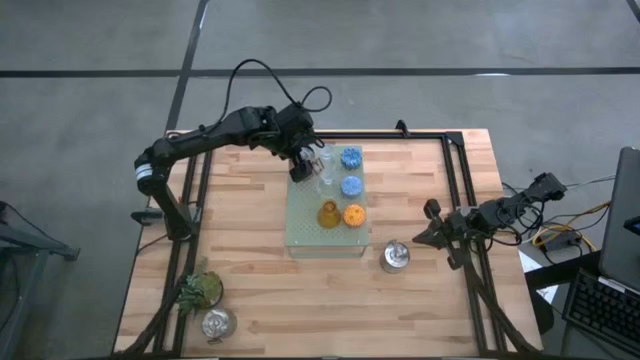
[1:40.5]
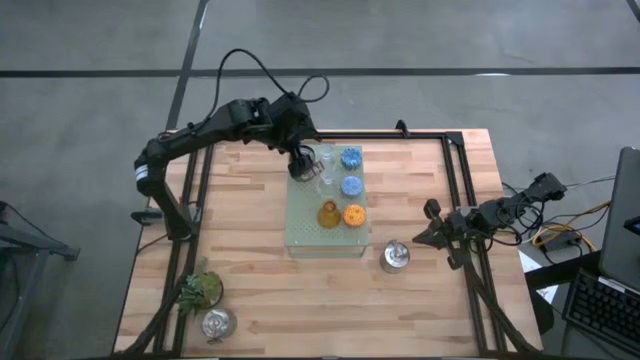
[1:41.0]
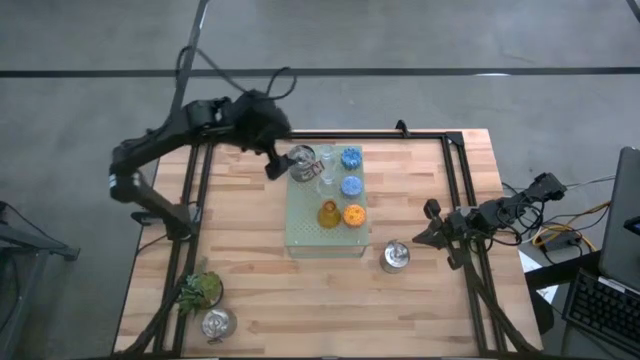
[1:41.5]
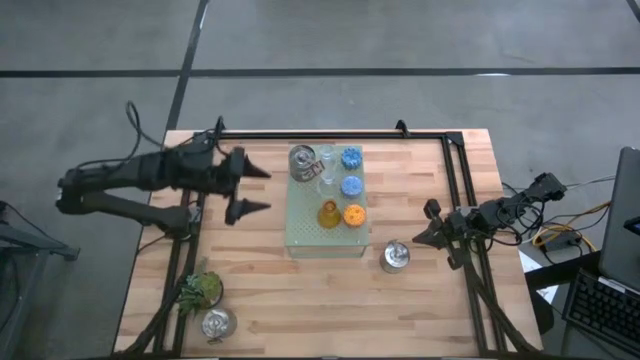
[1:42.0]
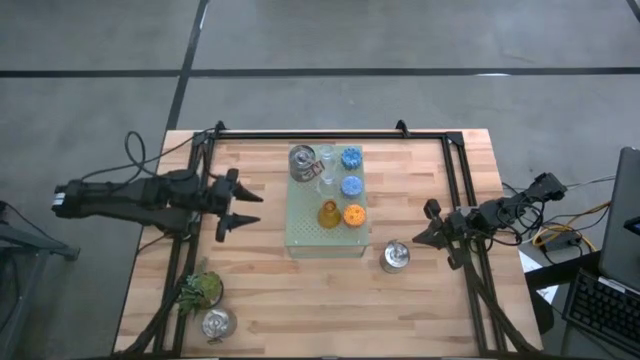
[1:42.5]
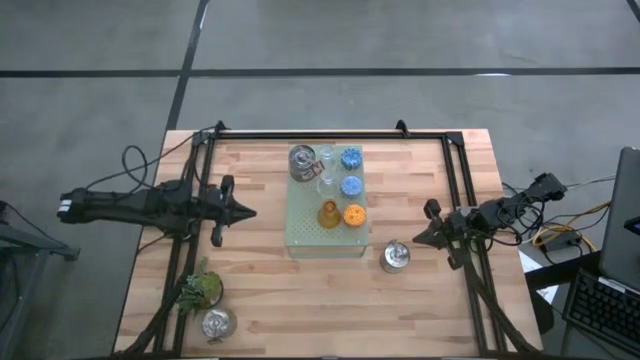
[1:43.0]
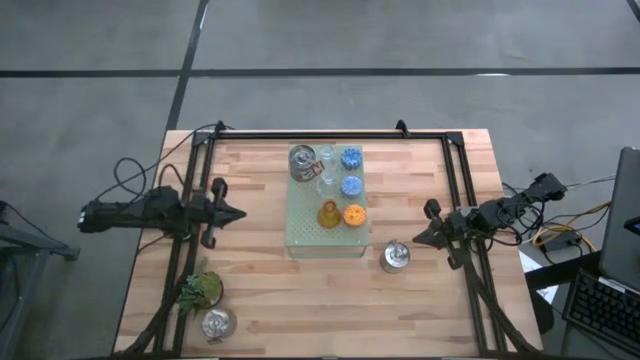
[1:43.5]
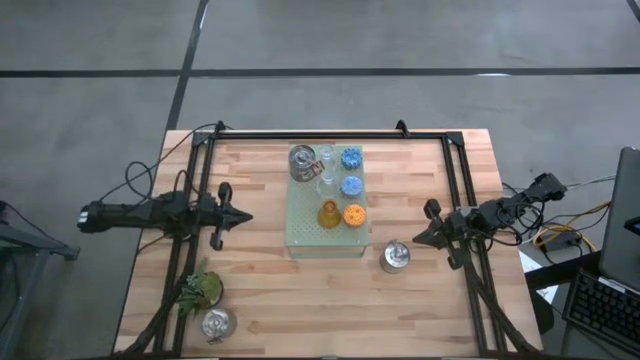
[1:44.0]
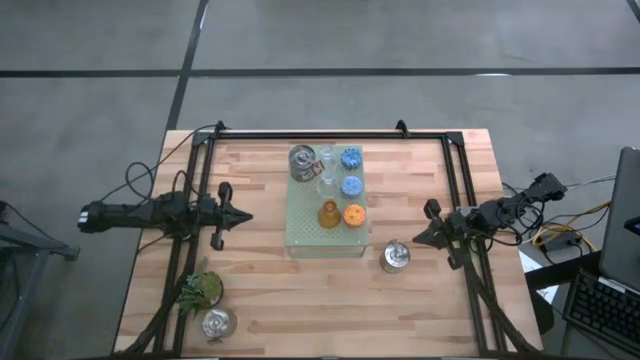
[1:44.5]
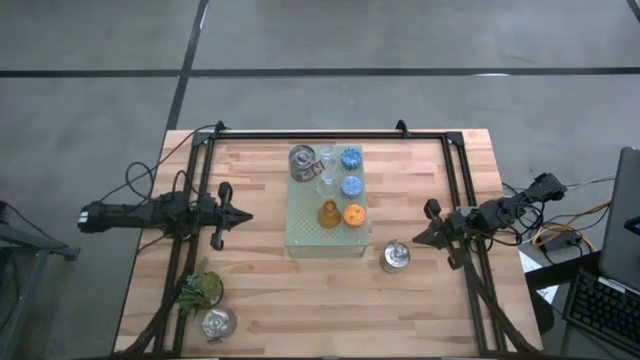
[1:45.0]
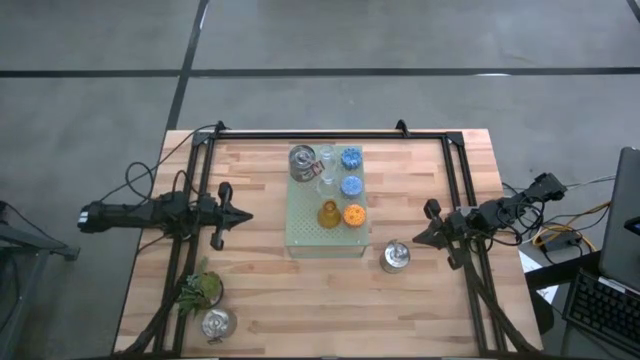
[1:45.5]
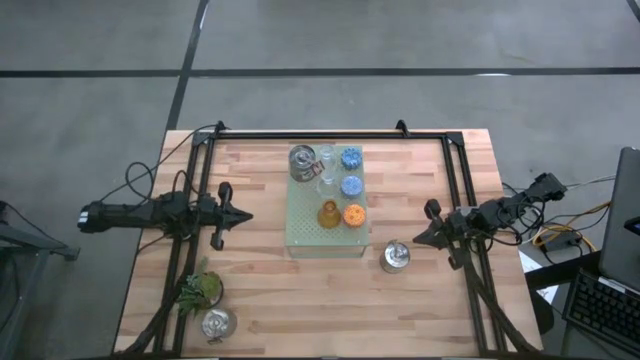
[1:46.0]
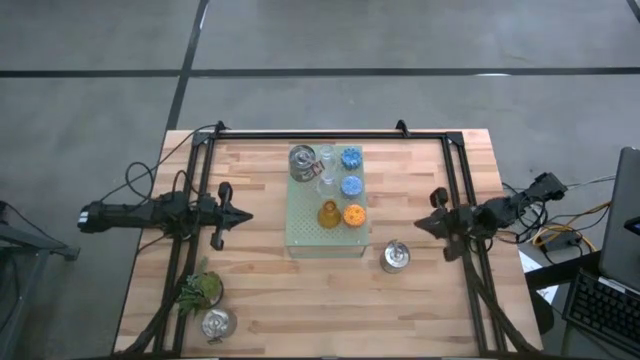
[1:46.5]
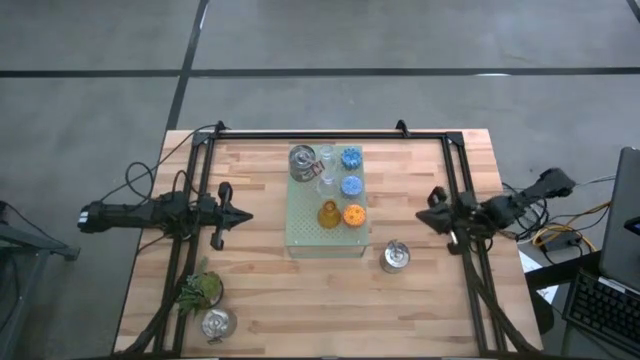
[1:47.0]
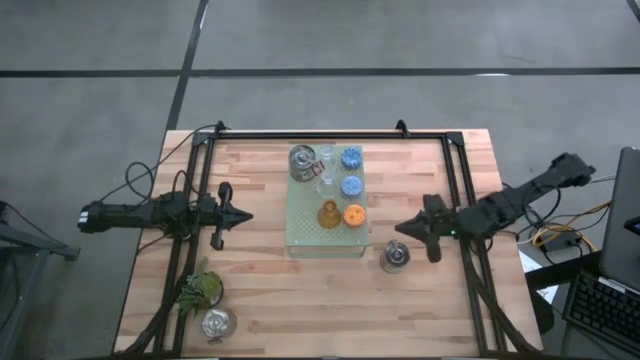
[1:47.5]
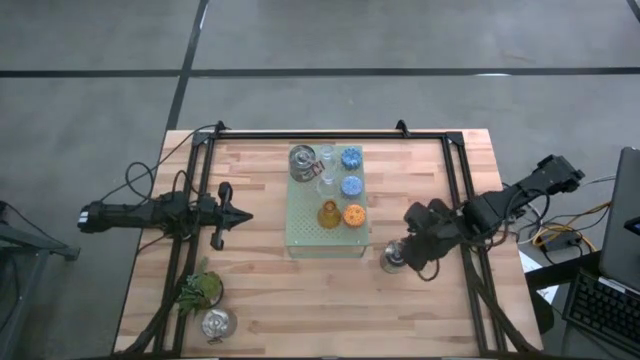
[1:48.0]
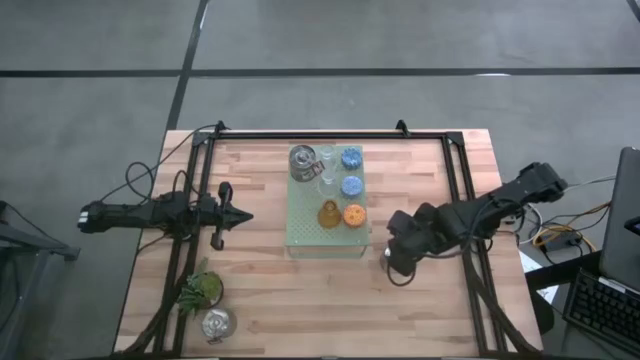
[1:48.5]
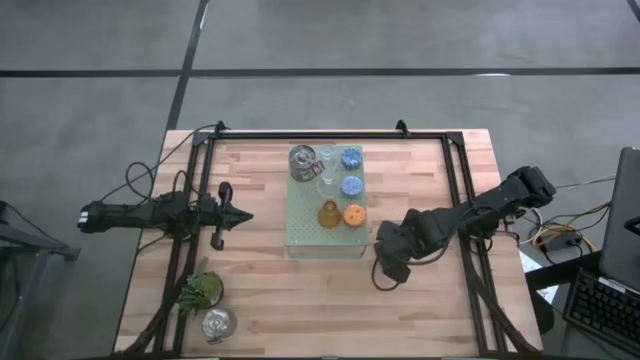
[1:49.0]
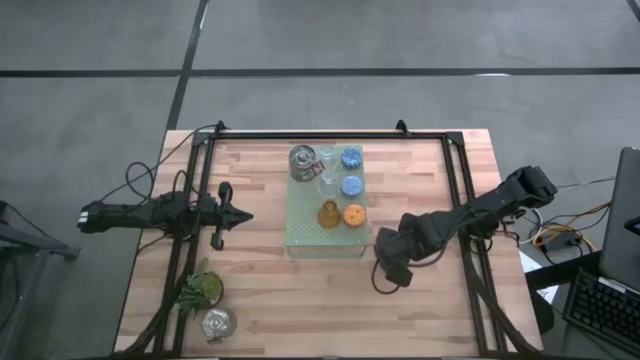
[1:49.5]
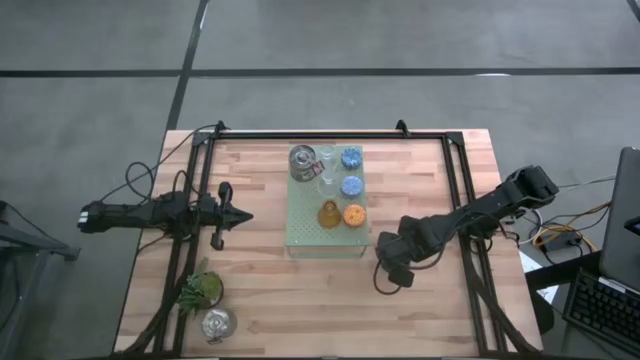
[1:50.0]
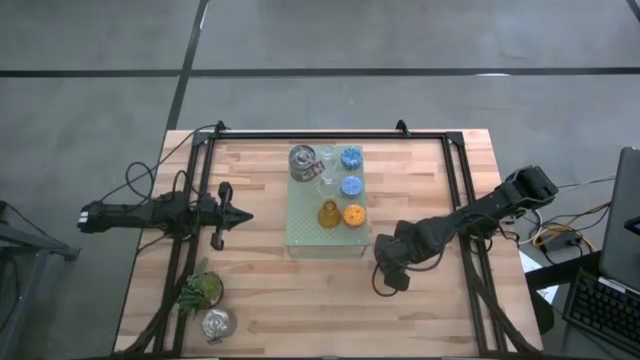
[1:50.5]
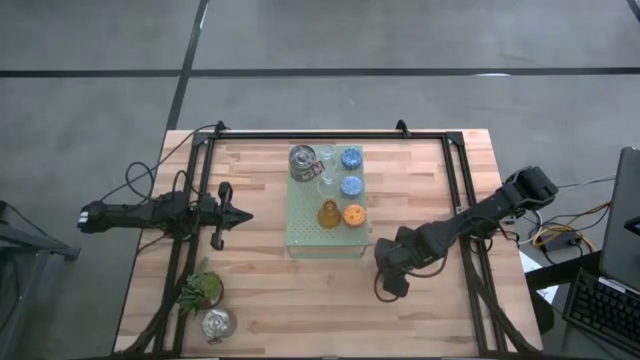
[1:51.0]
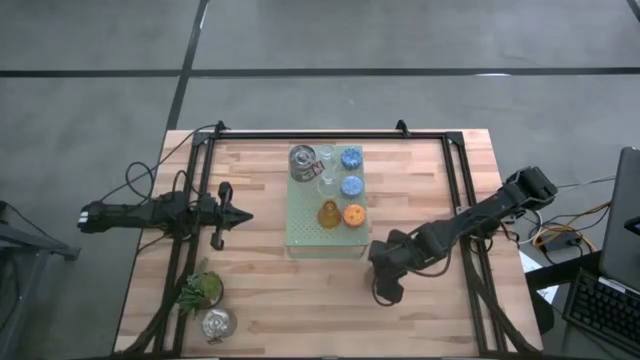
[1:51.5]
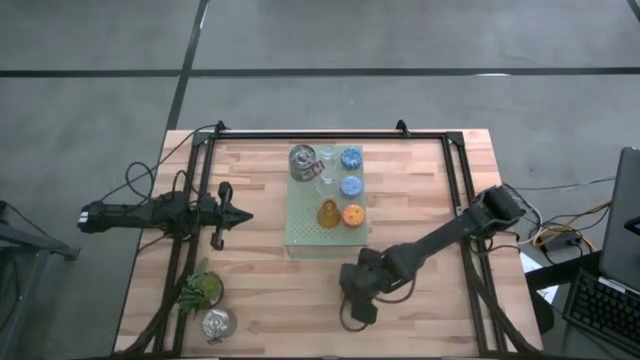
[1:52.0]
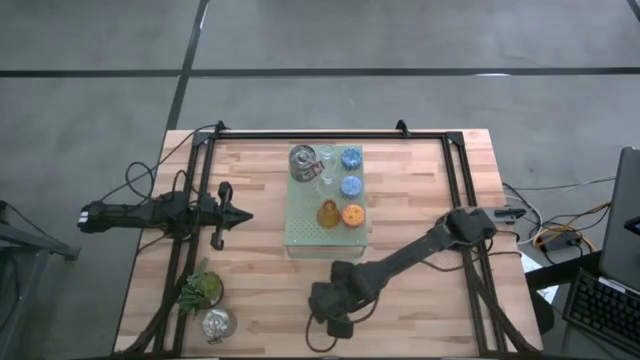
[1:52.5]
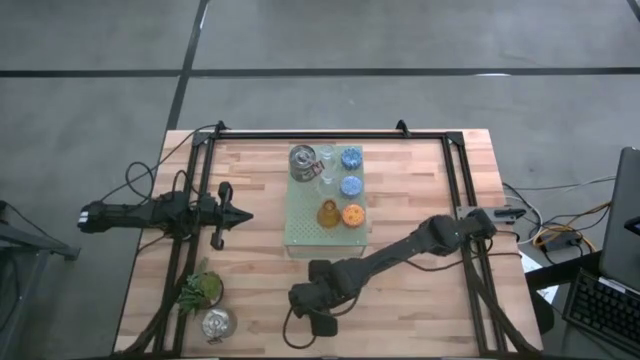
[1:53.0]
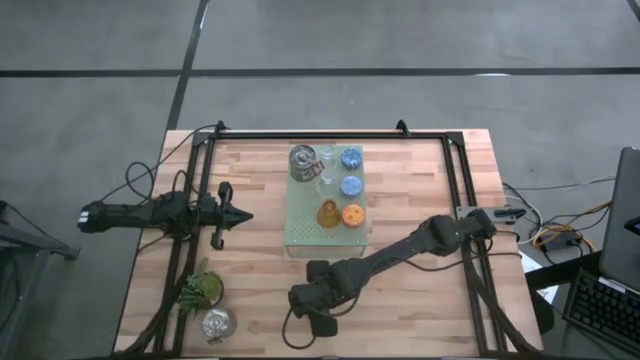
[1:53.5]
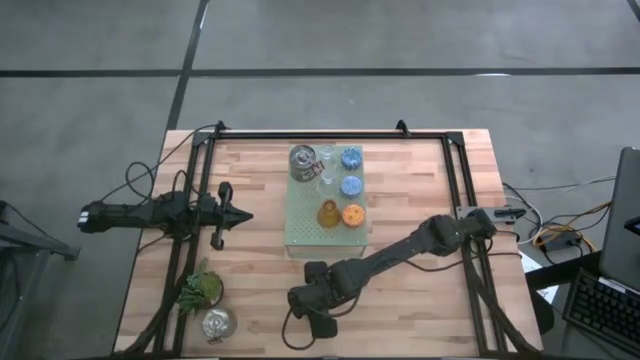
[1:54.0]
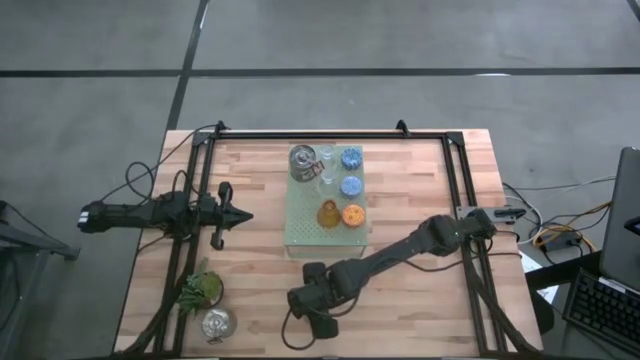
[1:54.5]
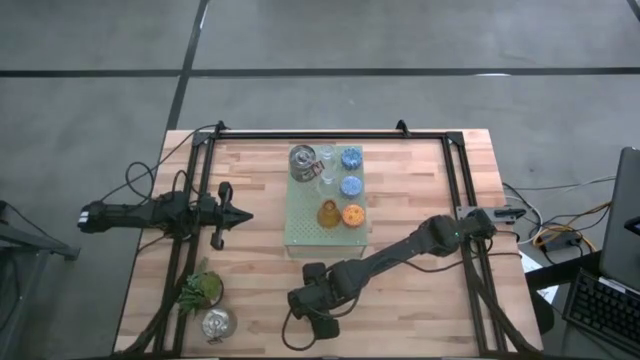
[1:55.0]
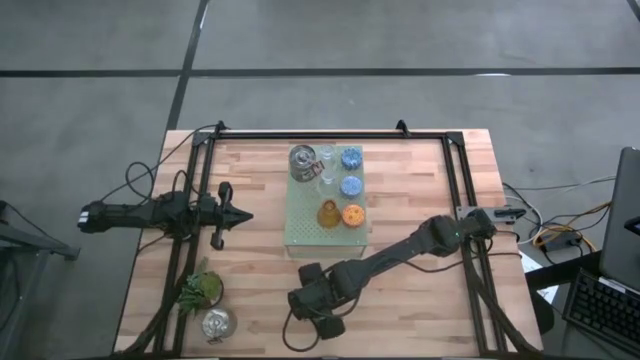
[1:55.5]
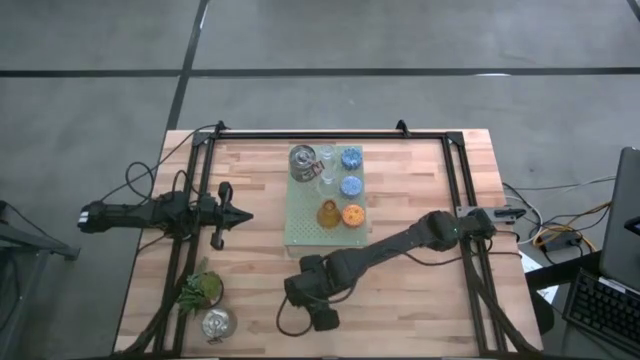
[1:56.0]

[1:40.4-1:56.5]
Task: Pick & Place candle stick holders
Put the green scented candle on the shelf aligned with the other brown scented candle

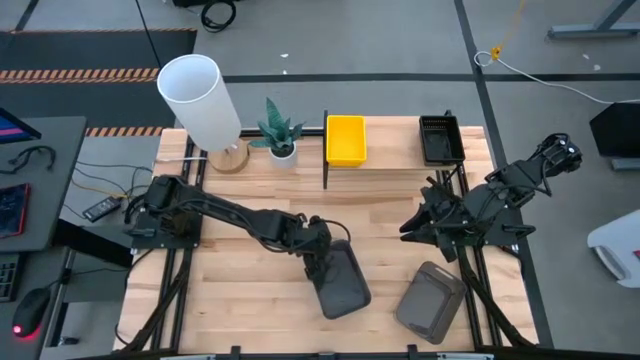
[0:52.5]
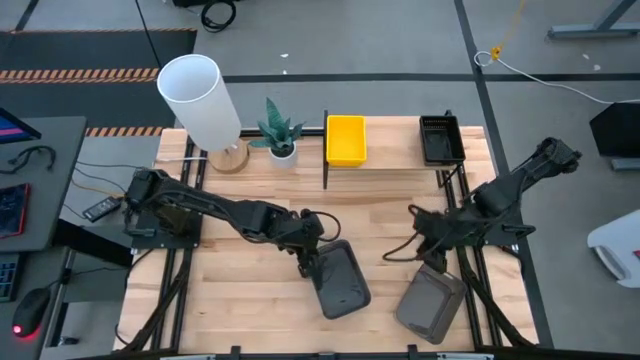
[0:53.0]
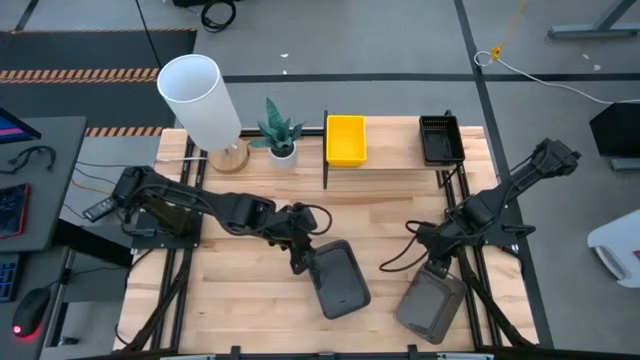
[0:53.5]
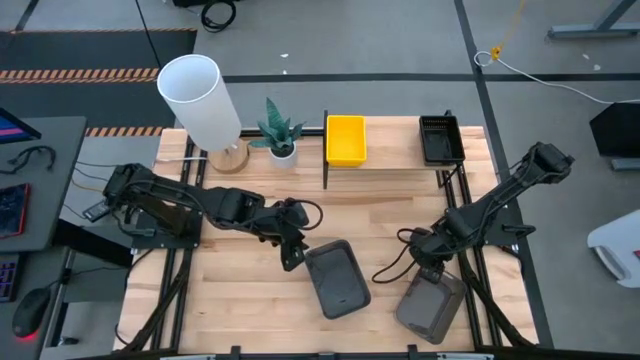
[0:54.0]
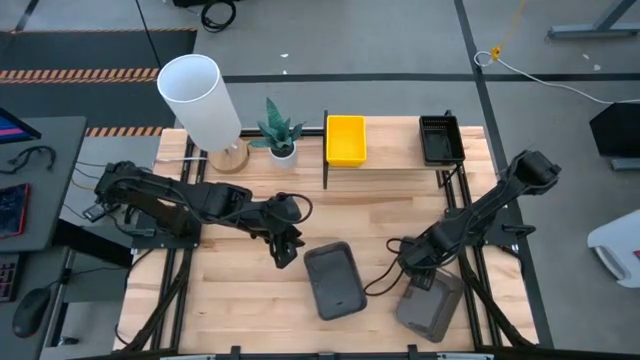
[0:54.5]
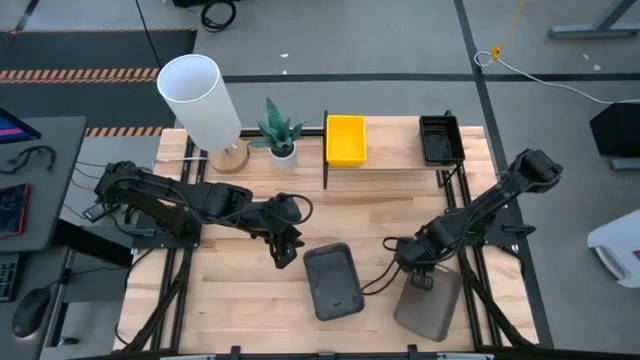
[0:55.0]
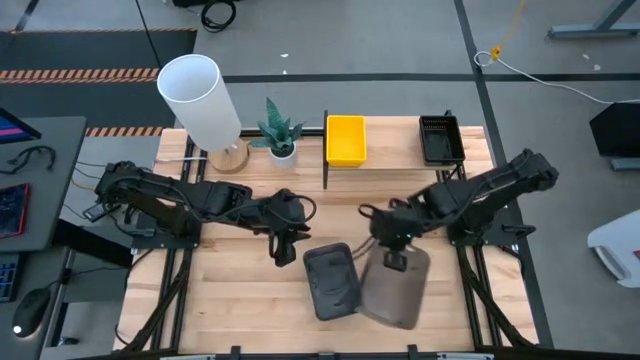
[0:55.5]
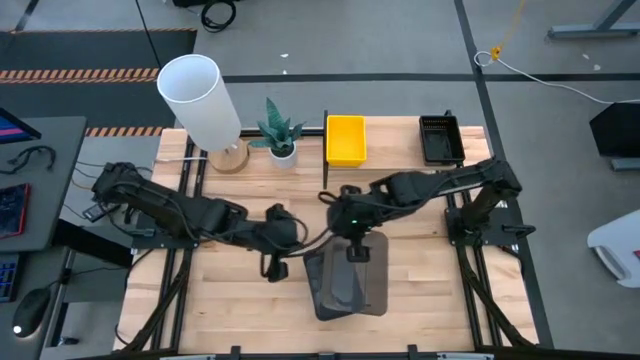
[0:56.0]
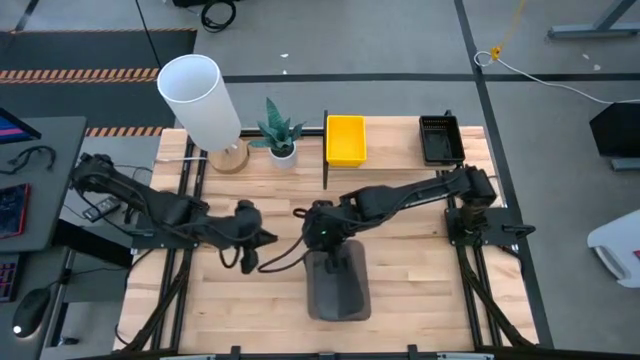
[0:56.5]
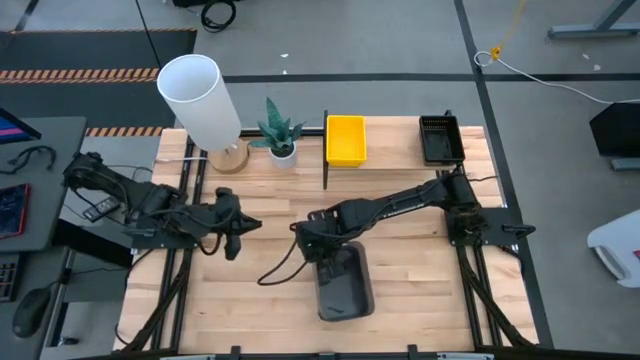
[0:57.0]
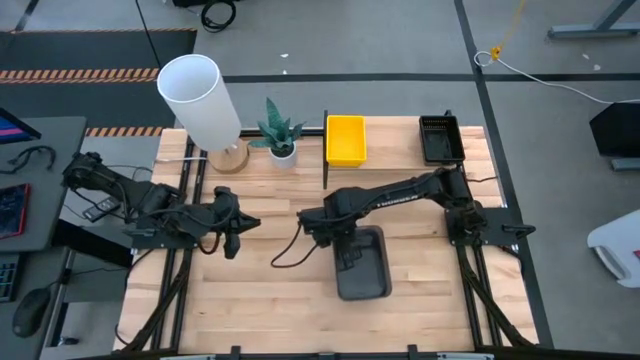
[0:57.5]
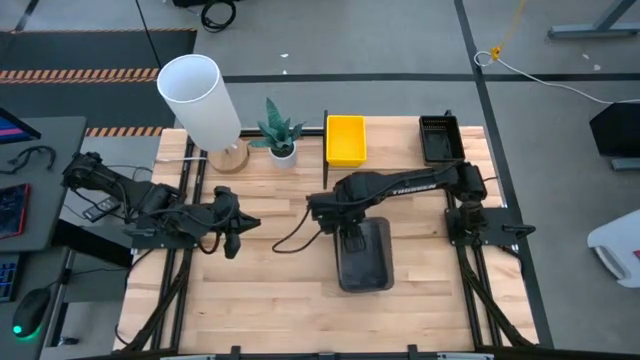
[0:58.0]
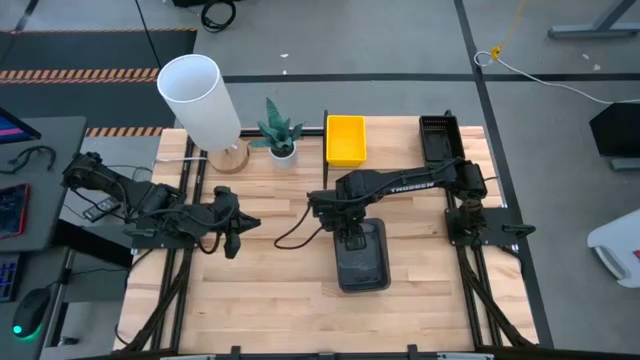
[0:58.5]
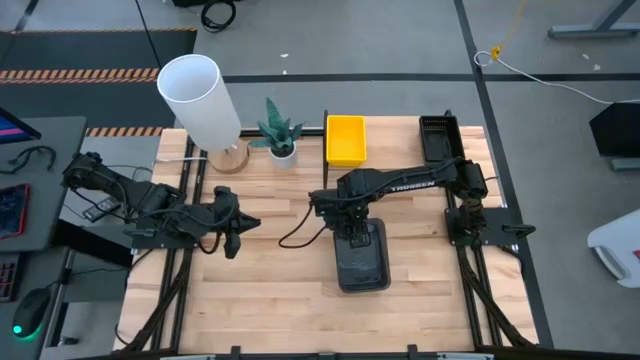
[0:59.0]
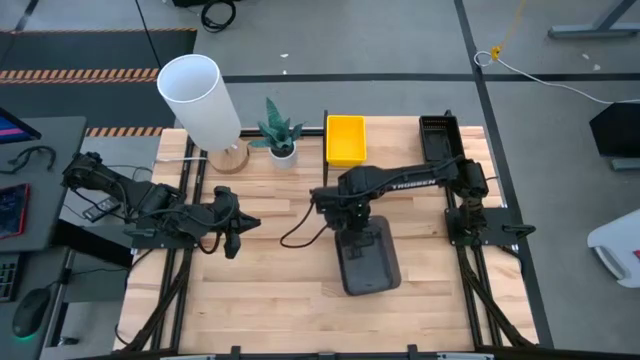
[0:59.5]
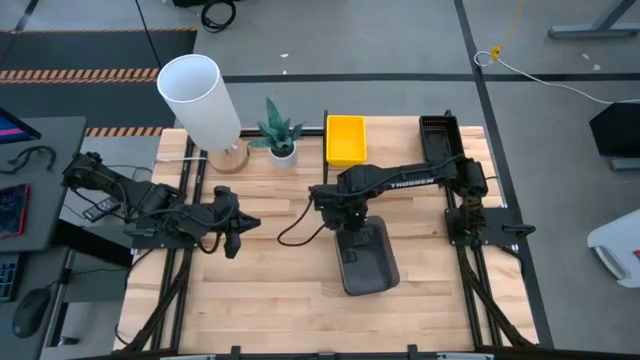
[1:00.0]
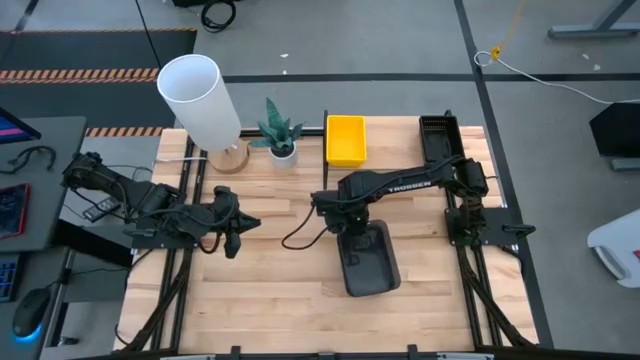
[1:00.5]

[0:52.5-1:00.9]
Task: Stack baskets on shelf by color
Stack the right gray bin on top of the left gray bin
